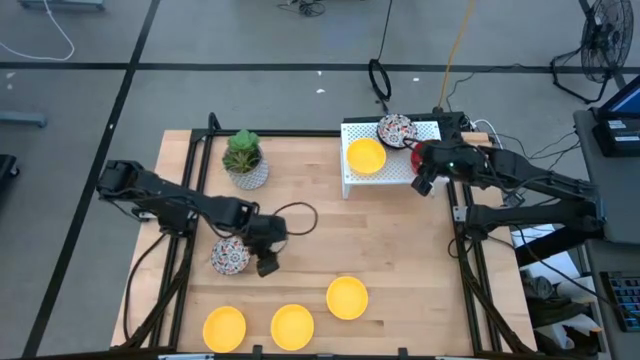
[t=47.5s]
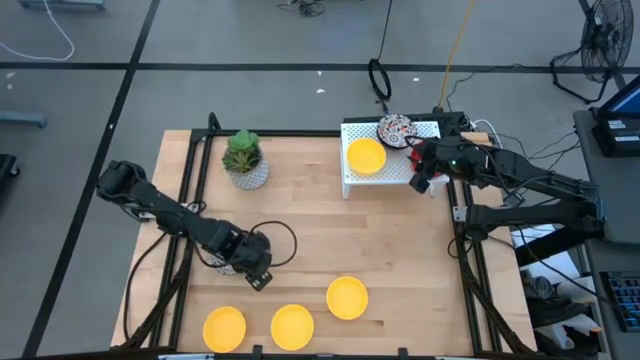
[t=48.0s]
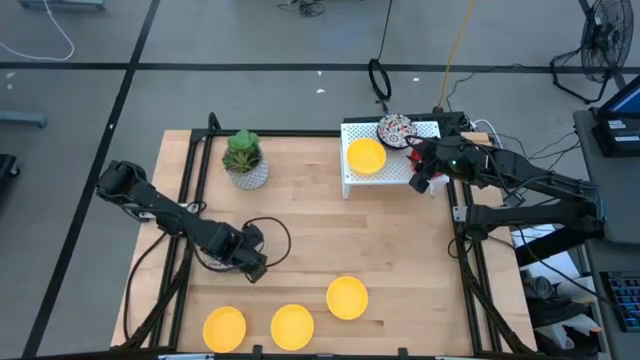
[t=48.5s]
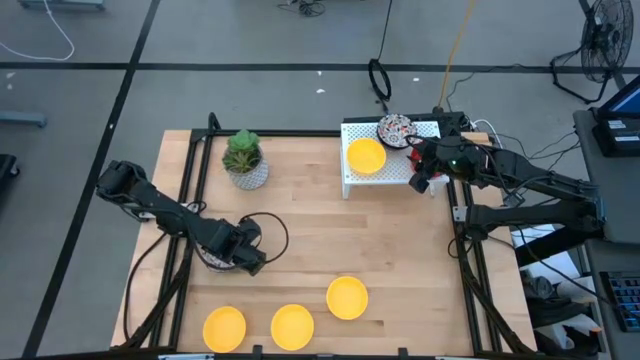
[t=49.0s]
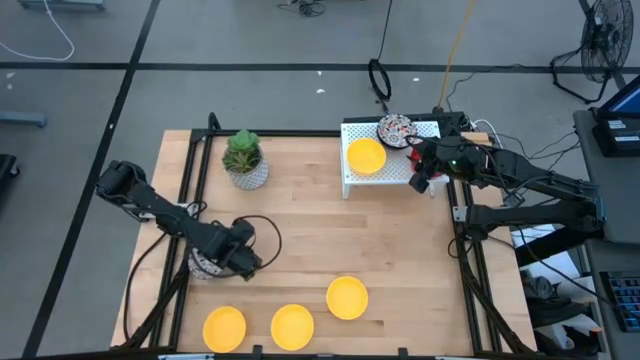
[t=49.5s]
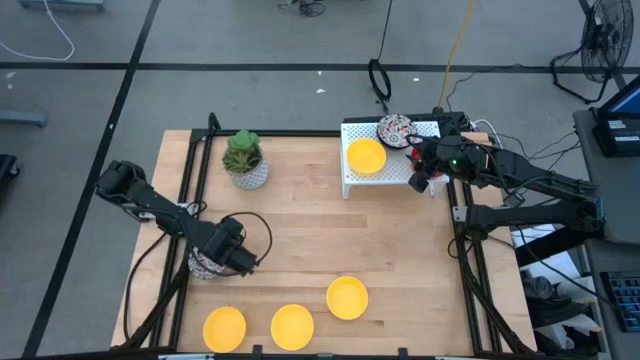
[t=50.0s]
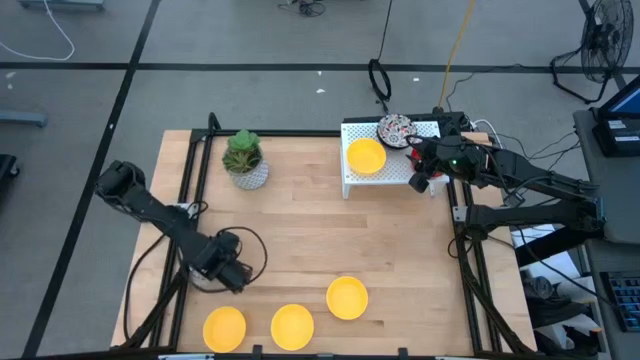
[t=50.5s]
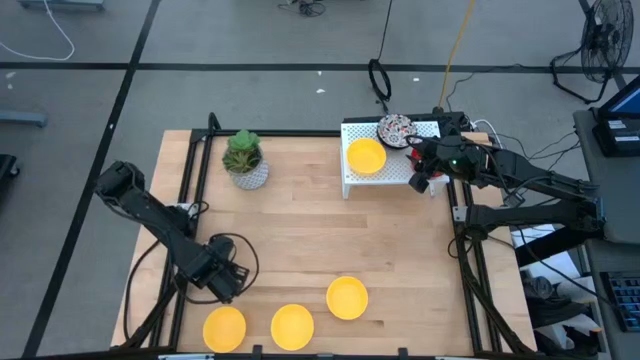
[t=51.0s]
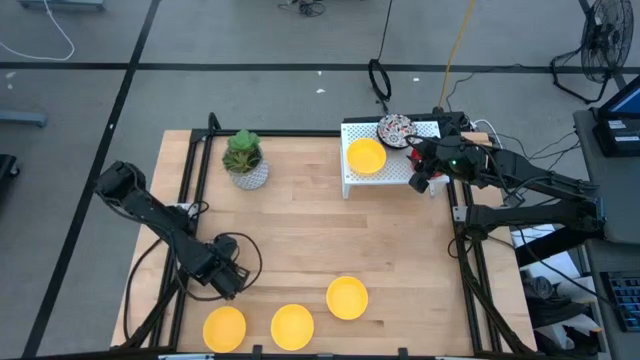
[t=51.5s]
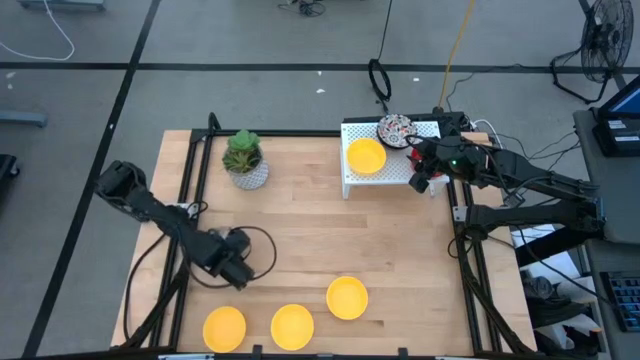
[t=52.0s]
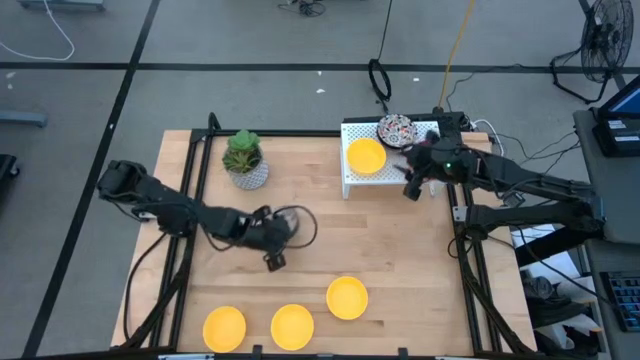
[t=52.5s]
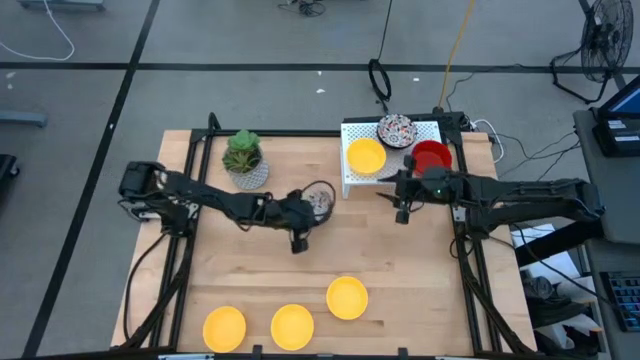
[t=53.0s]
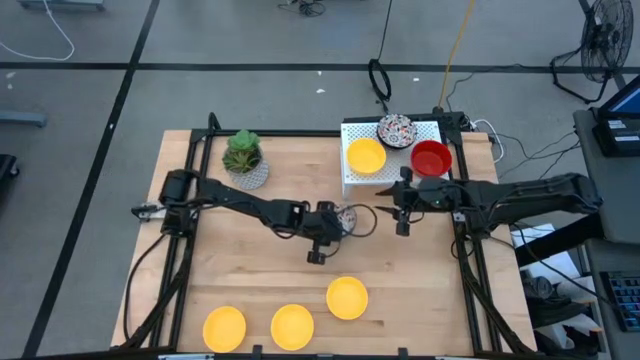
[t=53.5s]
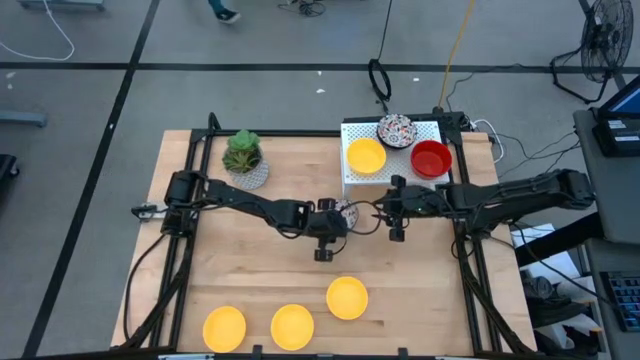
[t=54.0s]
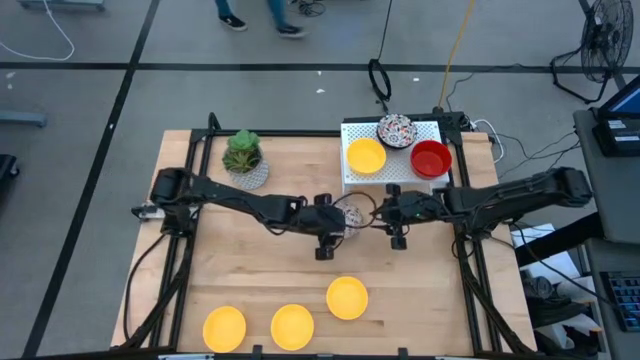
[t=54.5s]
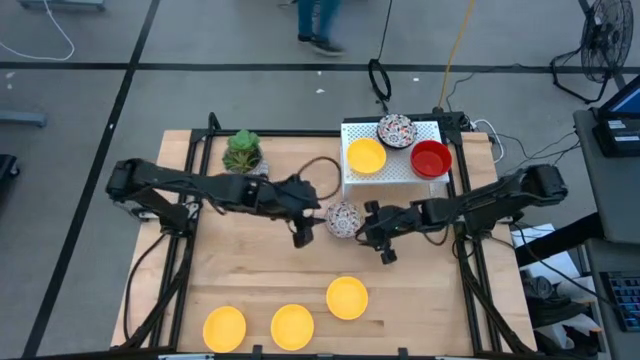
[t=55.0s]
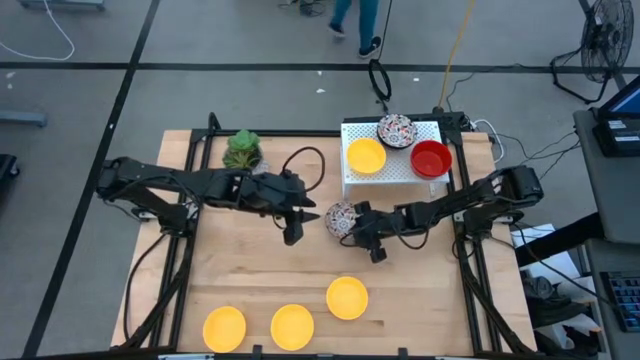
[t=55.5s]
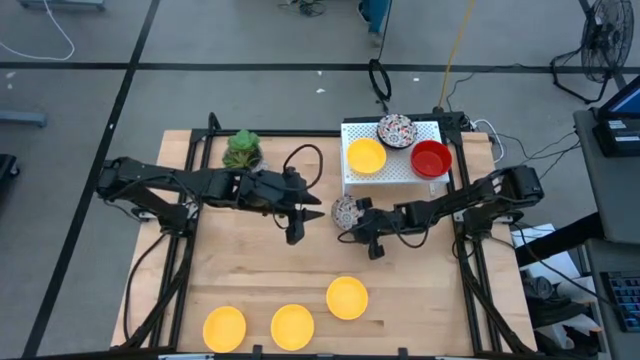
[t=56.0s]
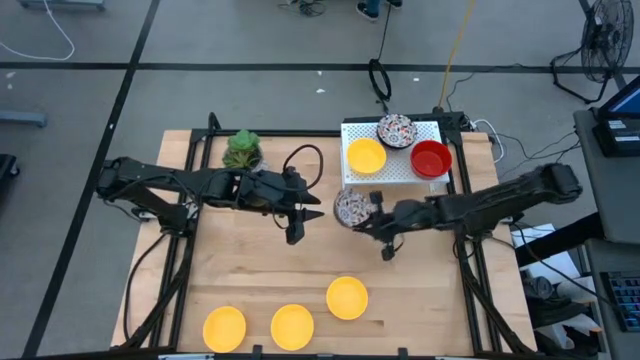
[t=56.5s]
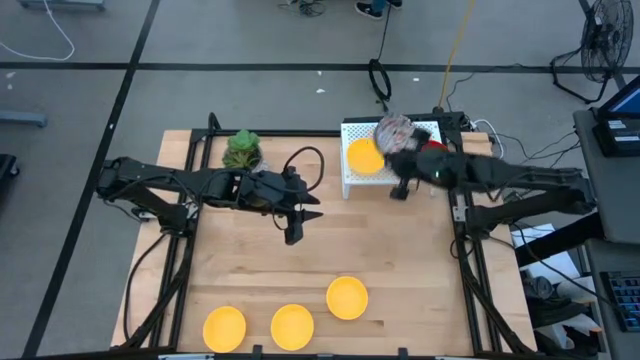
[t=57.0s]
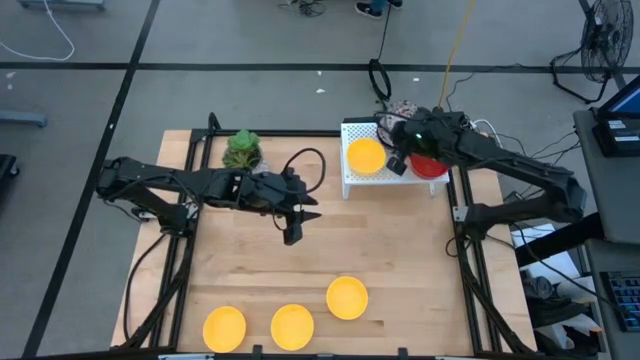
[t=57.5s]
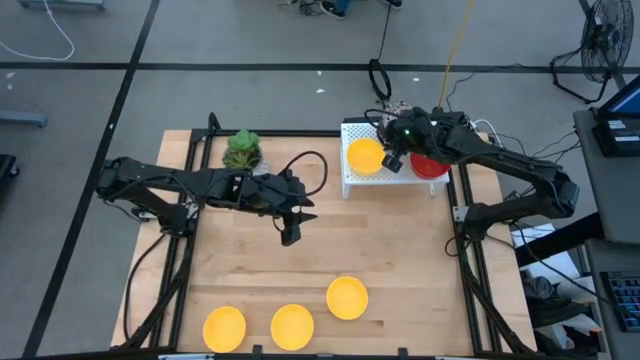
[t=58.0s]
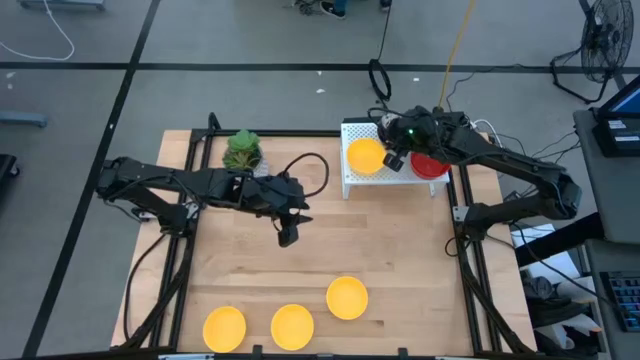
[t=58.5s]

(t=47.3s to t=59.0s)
Task: Pick & Place Mini bowls
Stack the black patterned bowl on top of the black patterned bowl on the shelf

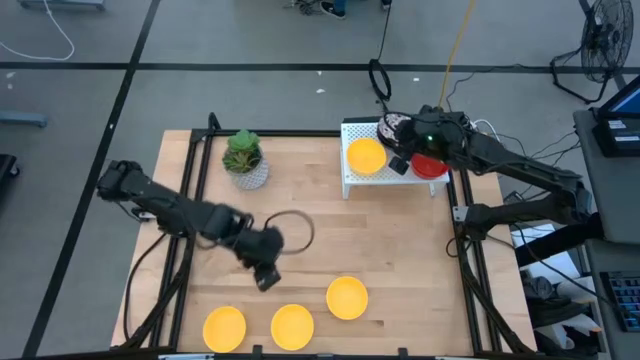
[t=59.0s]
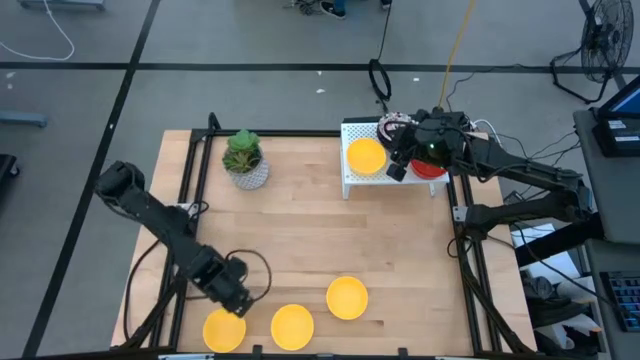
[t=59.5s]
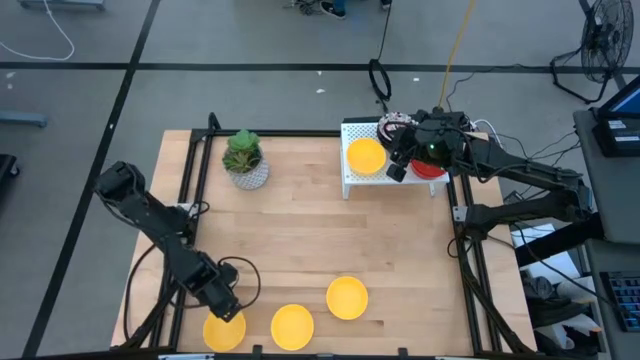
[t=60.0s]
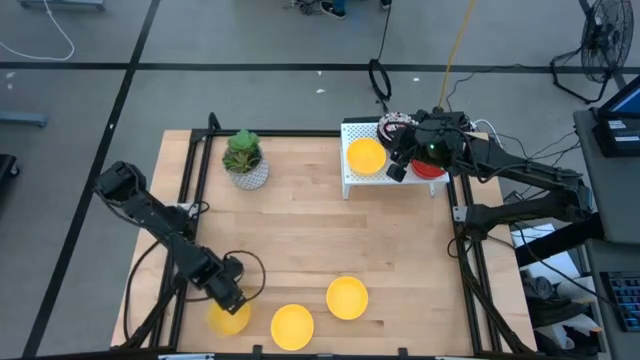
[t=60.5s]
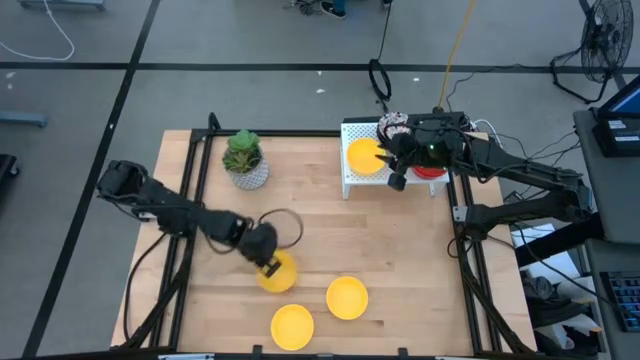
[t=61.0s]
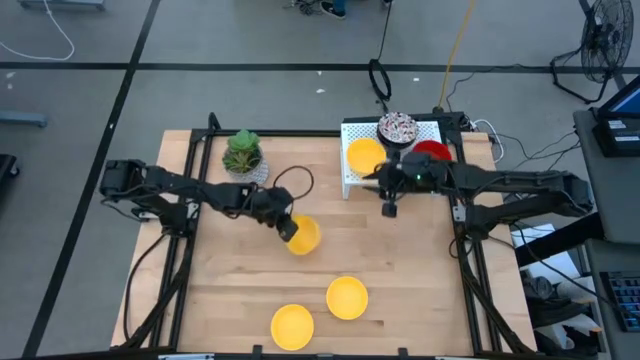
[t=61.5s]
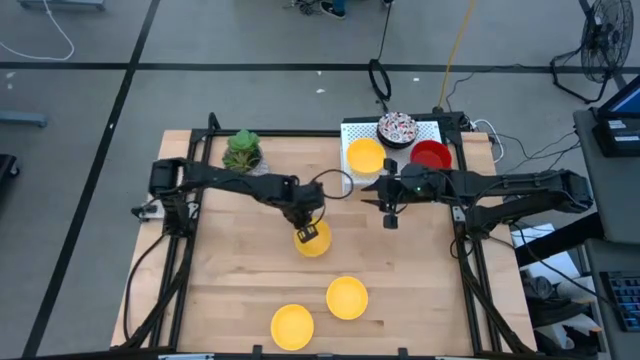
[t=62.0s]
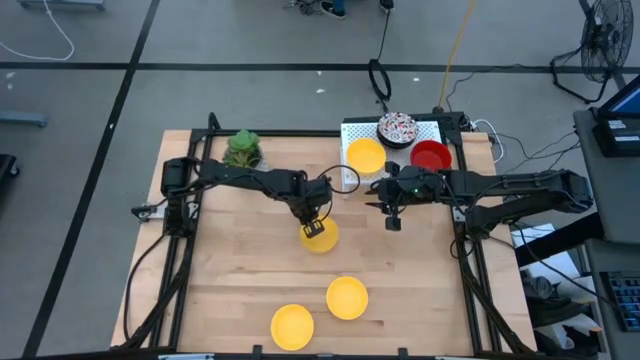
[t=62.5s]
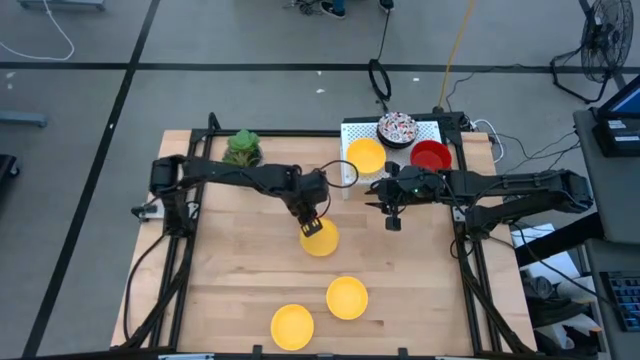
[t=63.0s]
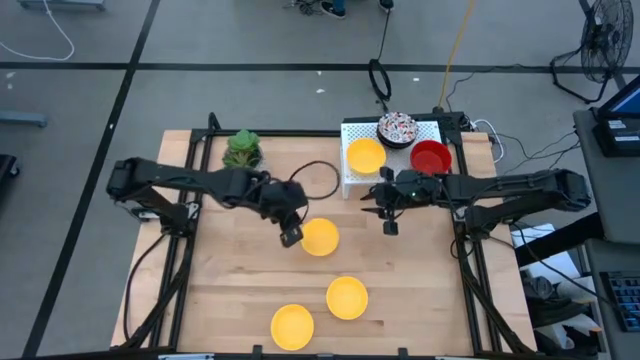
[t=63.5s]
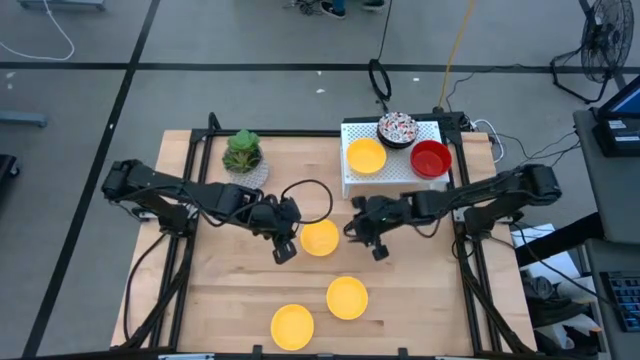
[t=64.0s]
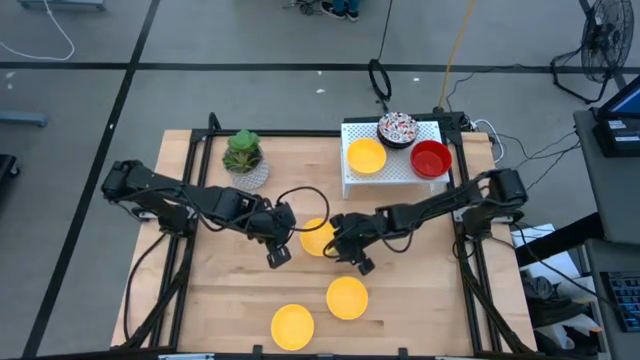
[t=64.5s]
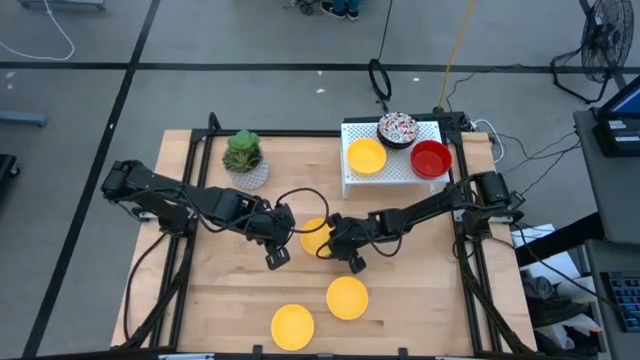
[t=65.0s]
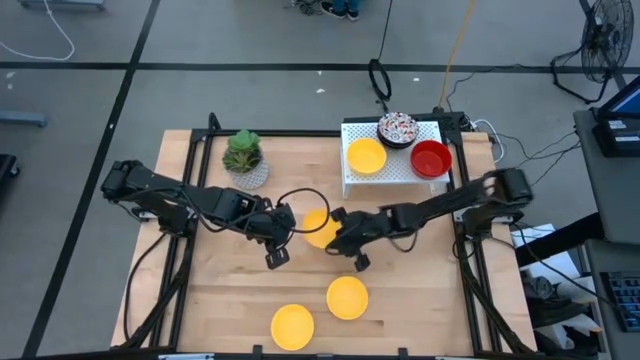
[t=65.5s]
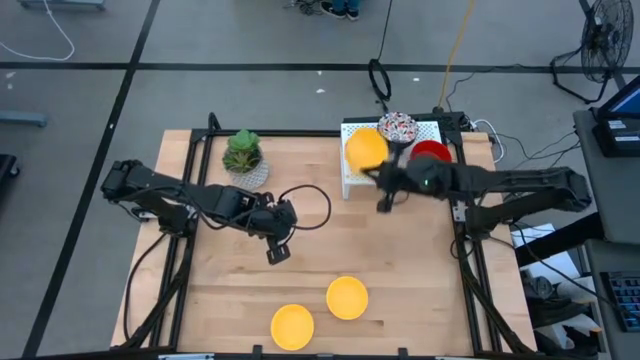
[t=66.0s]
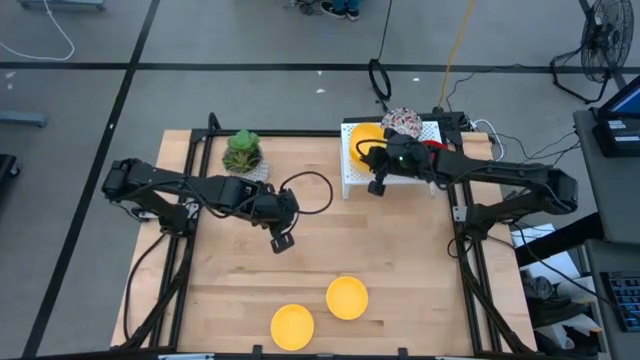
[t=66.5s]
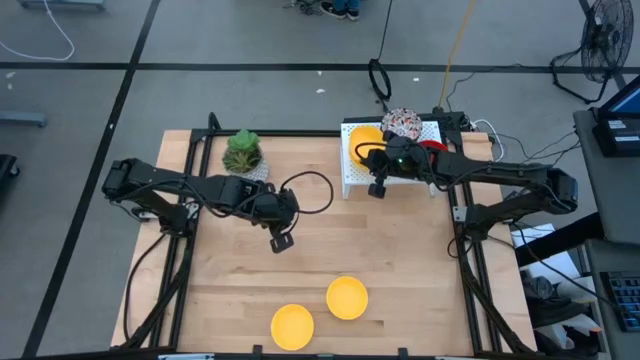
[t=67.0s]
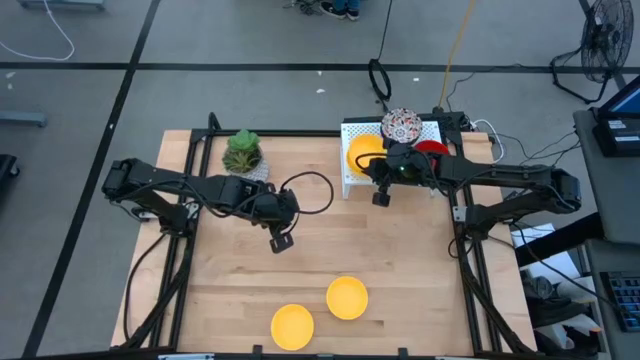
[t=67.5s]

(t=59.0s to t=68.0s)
Stack the yellow bowl on top of the yellow bowl on the shelf
